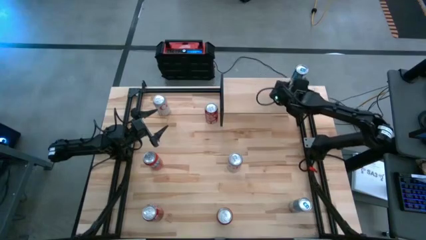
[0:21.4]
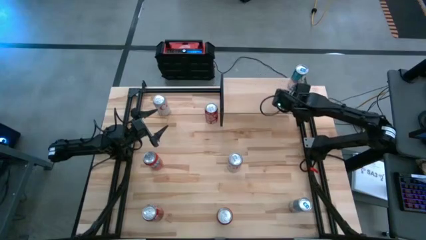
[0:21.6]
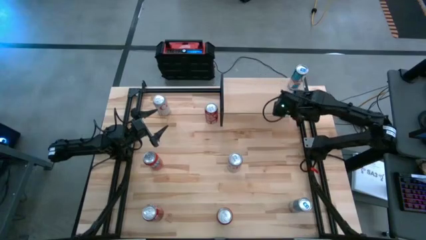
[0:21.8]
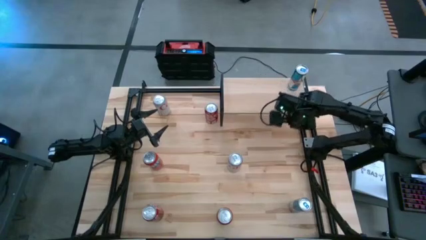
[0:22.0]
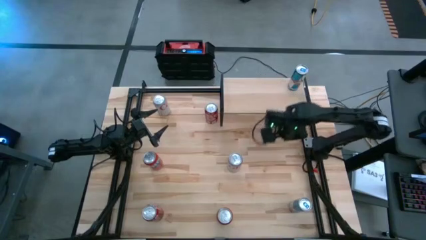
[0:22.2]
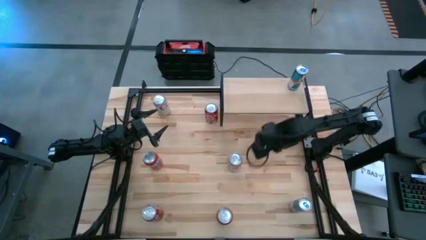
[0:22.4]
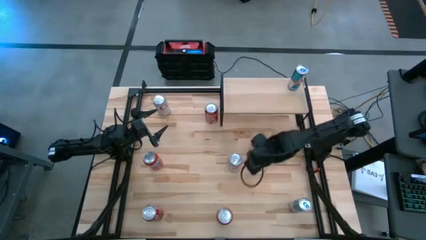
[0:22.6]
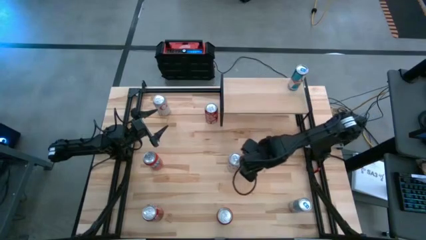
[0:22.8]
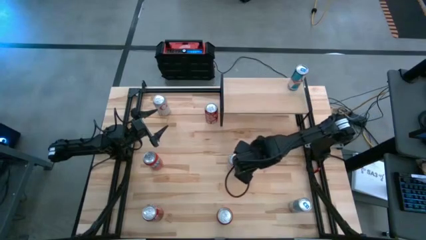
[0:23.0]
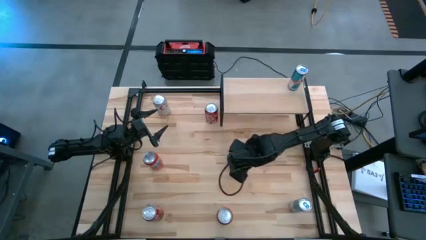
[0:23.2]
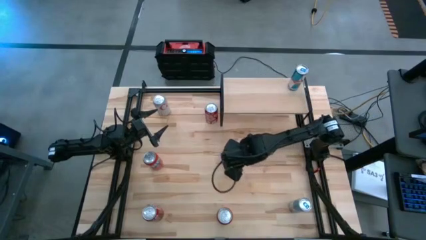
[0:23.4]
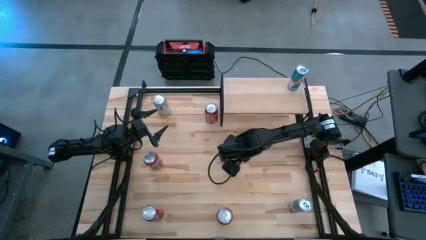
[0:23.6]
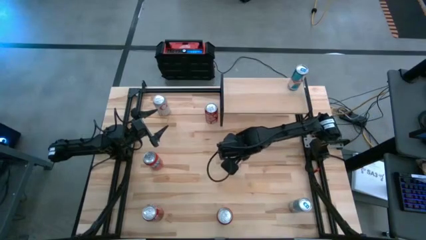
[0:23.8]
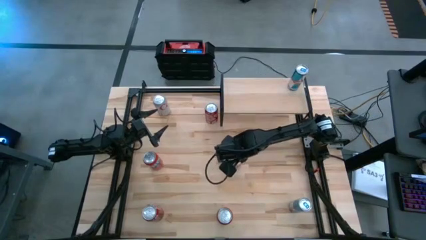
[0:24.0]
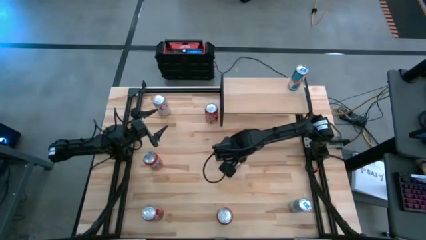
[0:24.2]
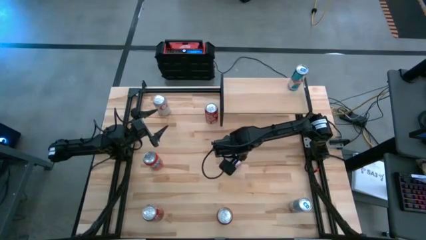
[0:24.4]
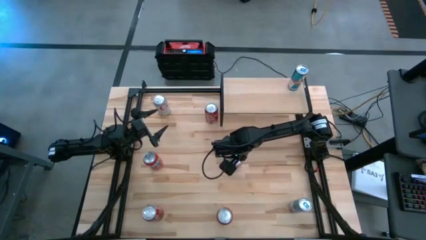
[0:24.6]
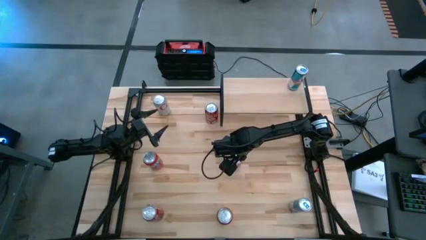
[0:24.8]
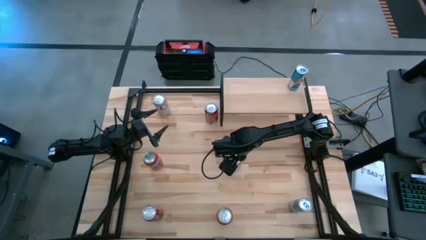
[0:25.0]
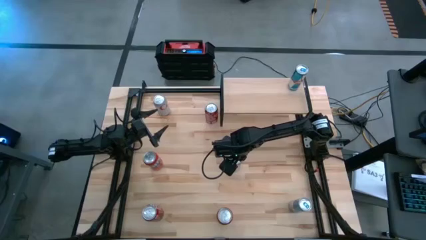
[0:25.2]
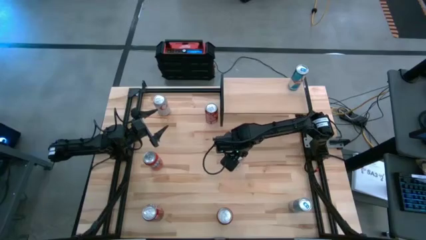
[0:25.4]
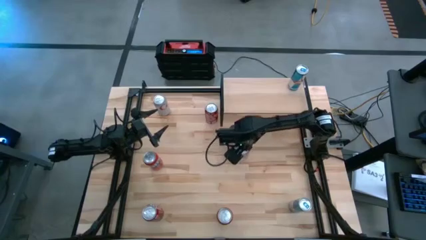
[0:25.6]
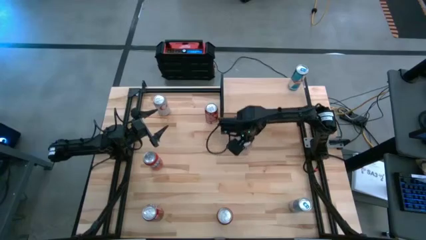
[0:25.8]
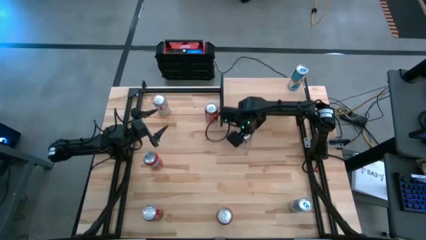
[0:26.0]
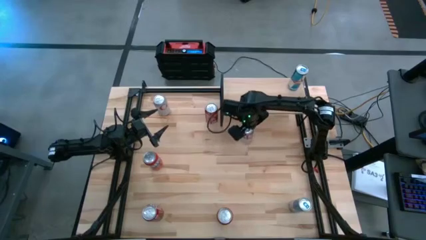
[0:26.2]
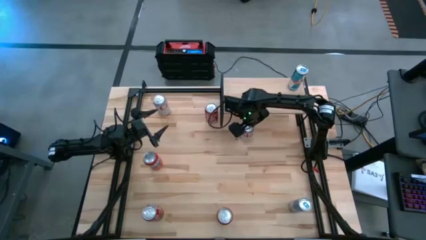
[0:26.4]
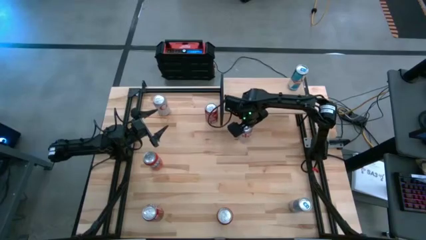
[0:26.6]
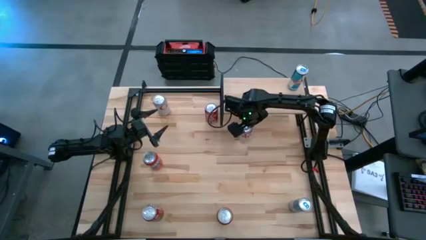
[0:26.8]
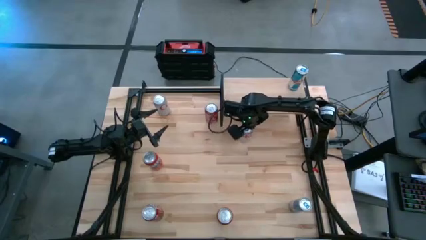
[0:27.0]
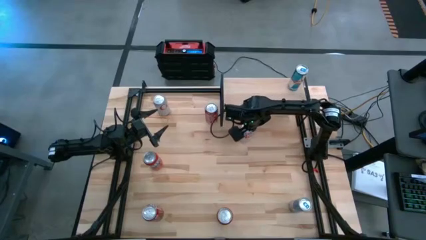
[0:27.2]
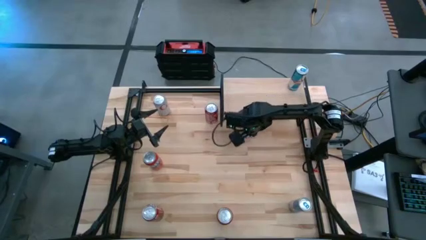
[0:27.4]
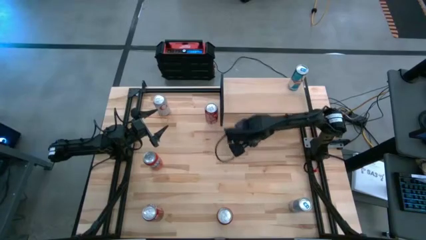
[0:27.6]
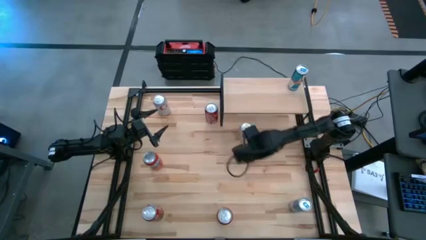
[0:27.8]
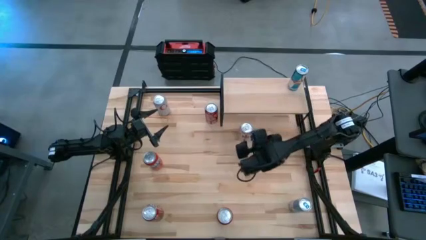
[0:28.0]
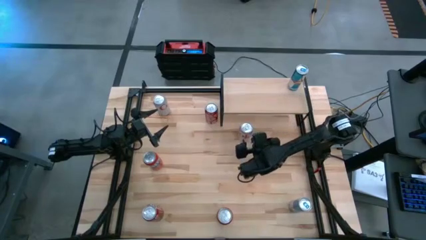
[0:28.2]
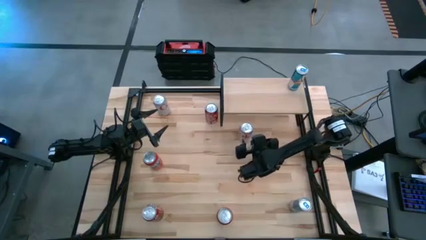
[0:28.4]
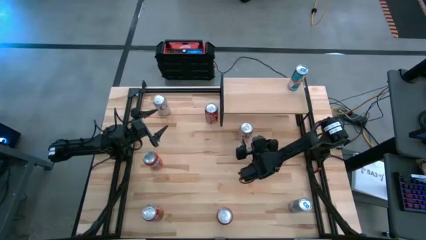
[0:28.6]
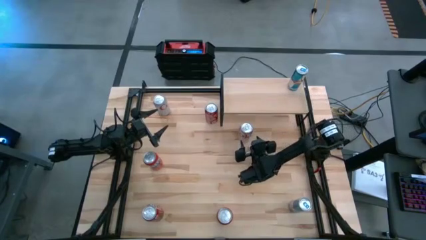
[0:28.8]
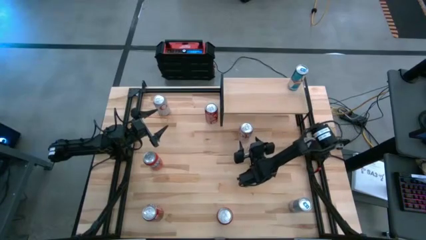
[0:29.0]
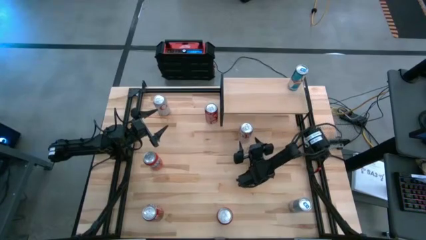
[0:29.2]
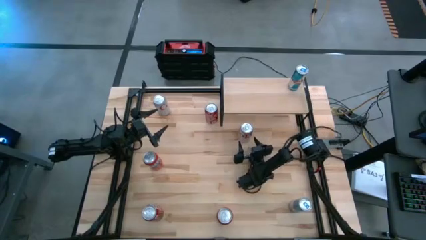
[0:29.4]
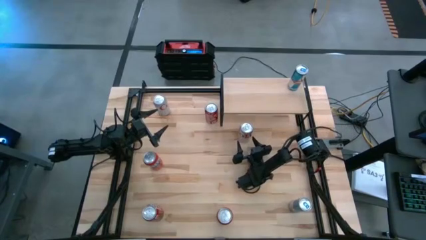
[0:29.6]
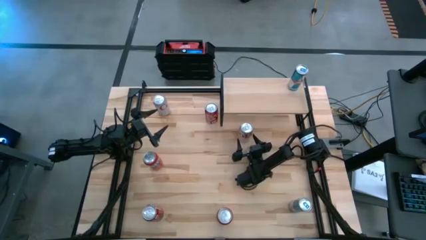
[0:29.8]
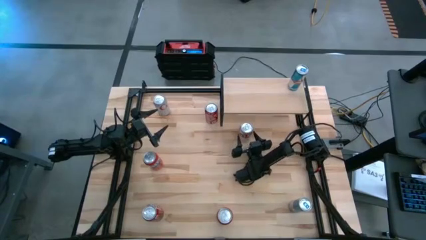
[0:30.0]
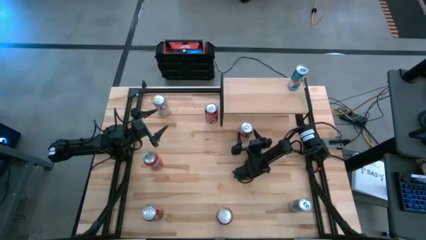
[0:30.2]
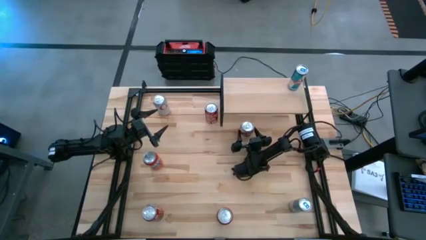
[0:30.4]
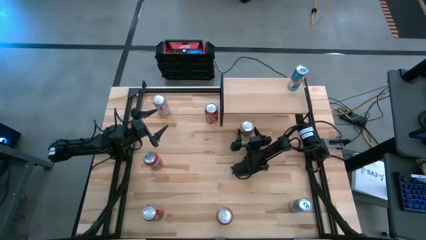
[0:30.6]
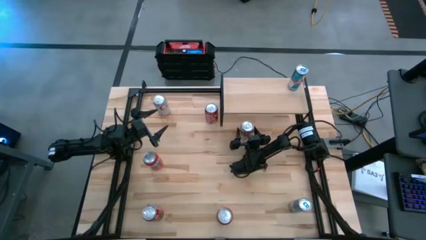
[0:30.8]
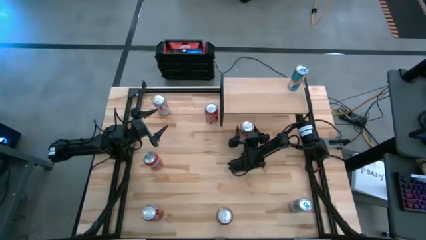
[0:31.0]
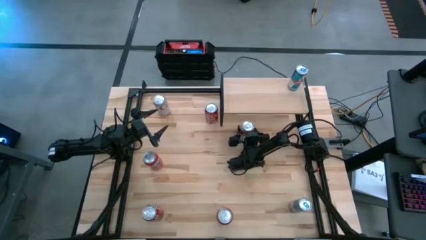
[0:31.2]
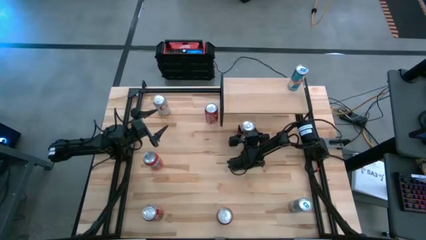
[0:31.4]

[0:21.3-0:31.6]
Task: Place canned beverage on shelf
Put the bottom silver soda can on the shelf

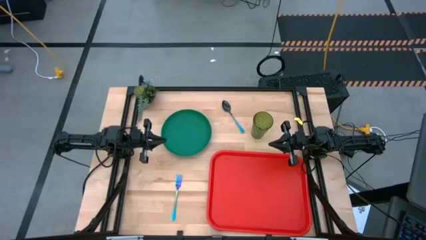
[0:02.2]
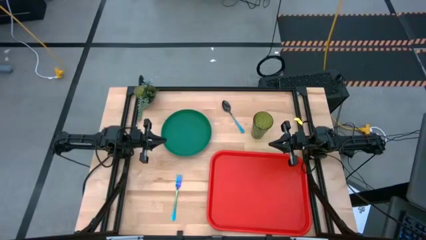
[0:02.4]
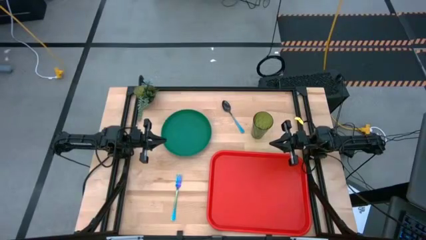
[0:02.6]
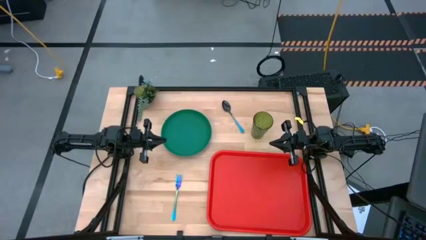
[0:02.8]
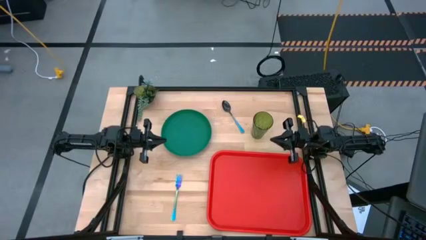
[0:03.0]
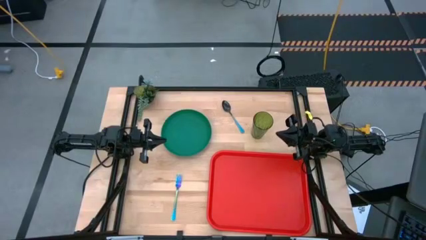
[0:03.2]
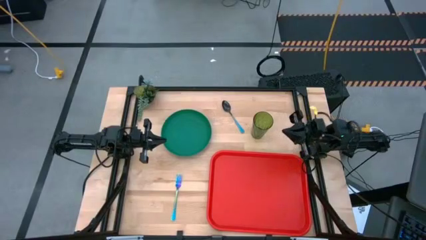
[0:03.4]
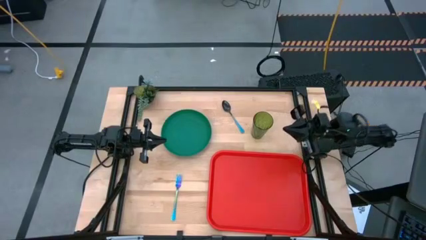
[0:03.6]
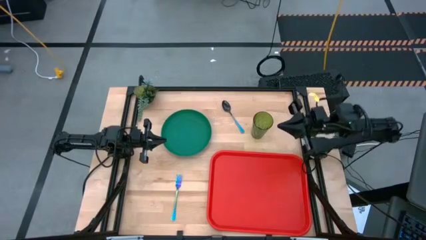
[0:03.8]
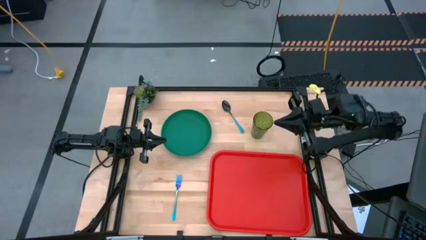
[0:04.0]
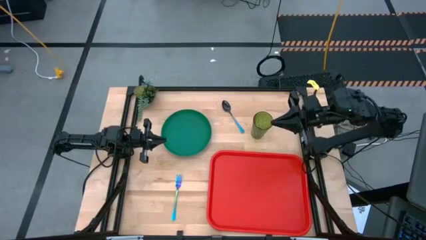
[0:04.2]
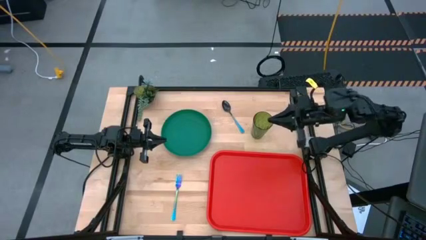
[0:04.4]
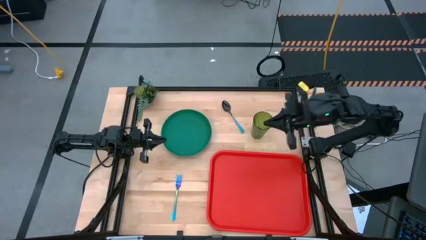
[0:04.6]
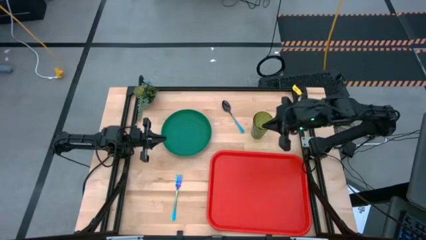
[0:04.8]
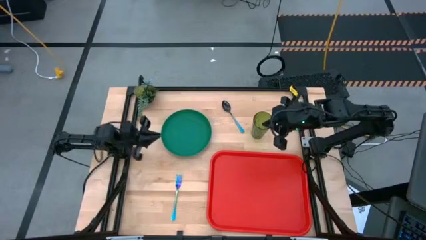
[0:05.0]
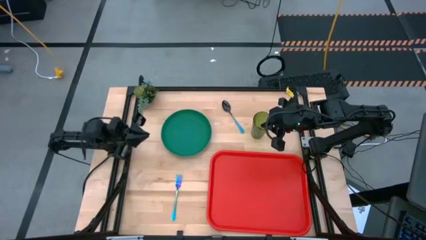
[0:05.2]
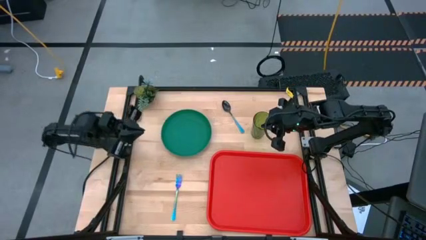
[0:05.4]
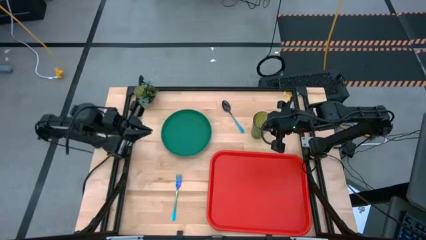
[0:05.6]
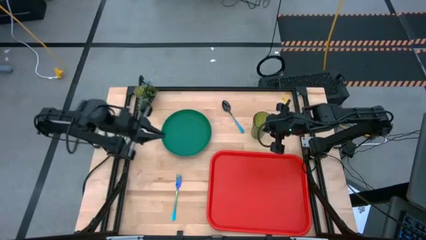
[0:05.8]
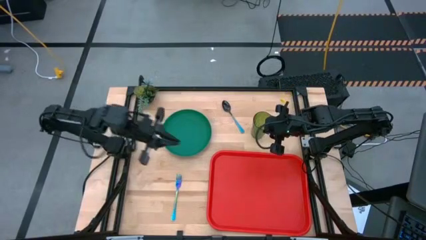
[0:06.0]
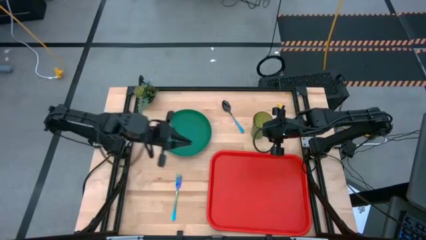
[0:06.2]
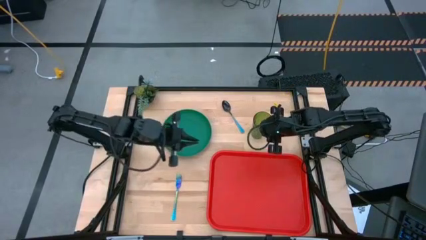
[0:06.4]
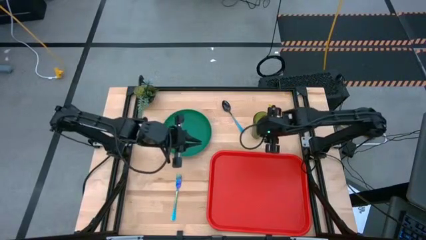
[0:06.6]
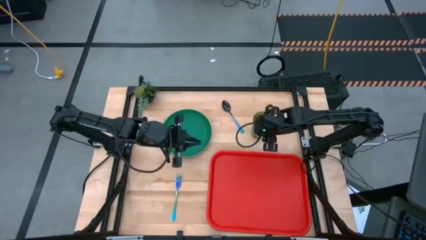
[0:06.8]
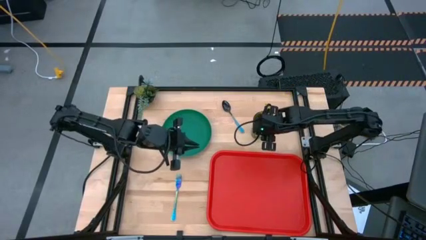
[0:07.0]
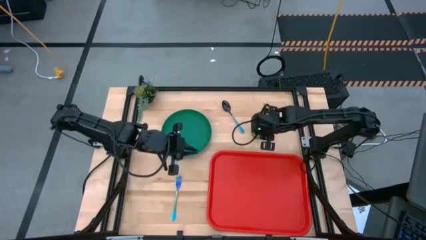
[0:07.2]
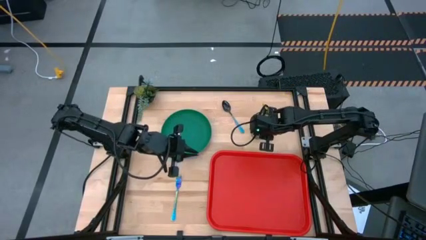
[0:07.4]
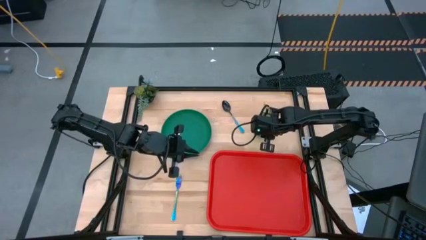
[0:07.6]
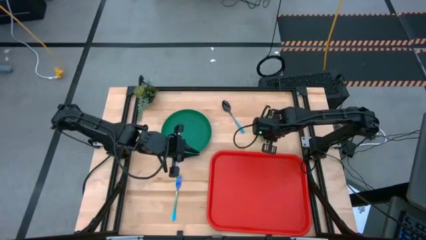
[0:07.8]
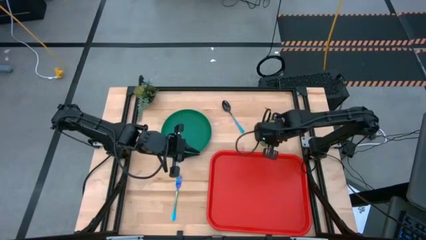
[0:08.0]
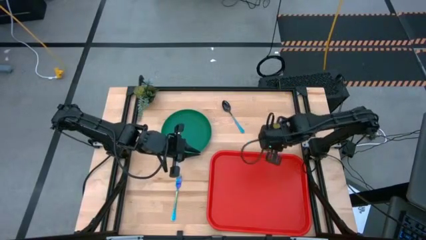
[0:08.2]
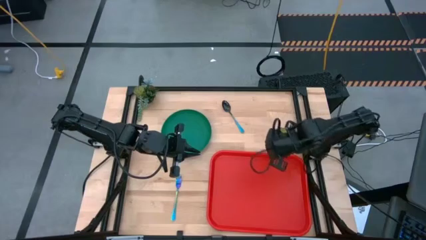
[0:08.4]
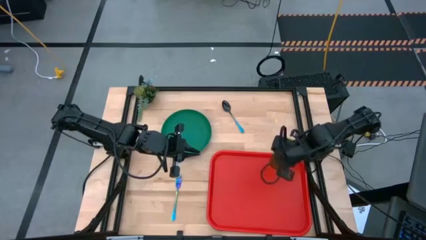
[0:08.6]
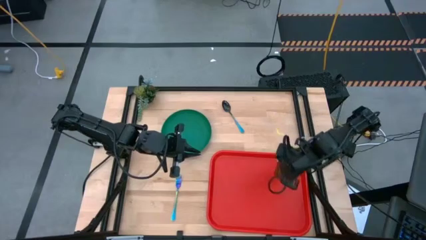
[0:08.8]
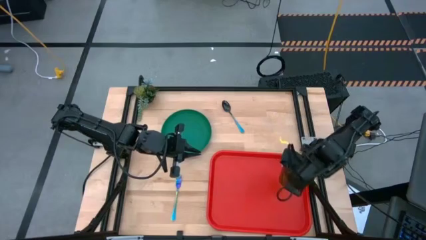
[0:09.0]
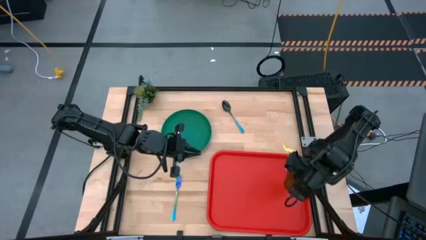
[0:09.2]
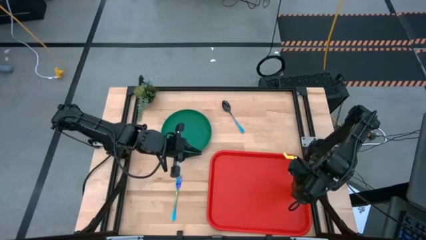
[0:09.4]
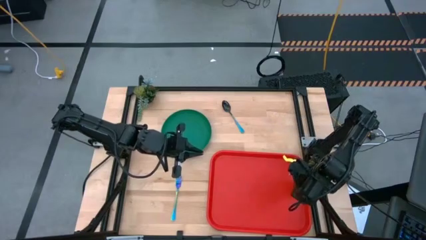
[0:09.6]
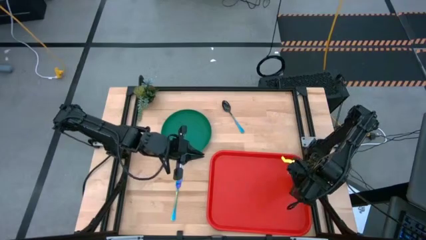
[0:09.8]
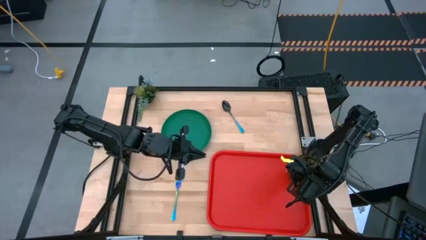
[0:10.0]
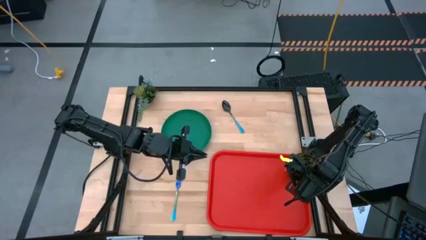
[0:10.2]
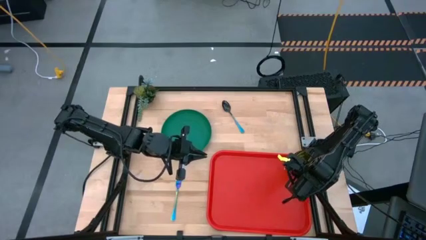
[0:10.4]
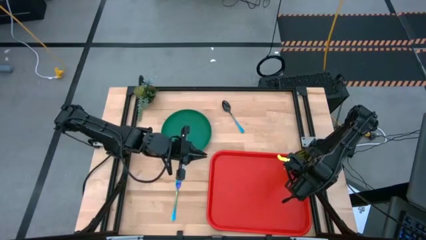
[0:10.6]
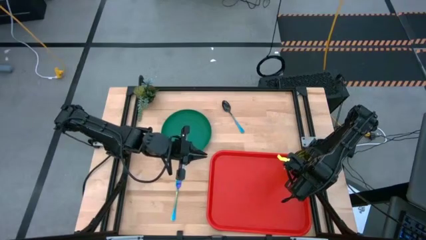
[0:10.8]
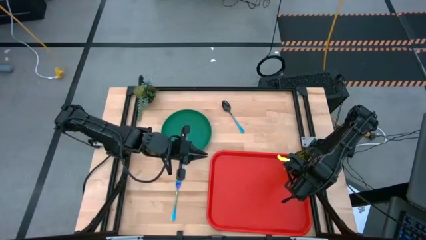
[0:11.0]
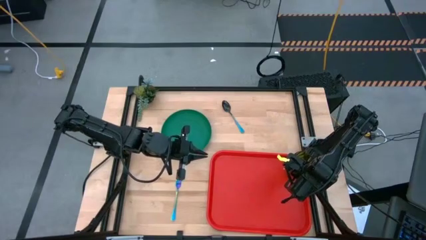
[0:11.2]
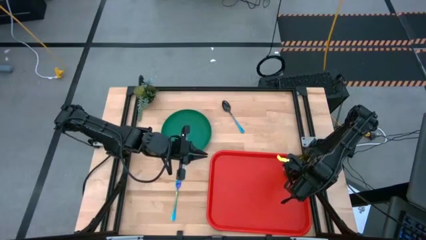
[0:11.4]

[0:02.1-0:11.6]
Task: Pick and place plate/cup/fork/spoon on tray
Put the green cup into the red tray
